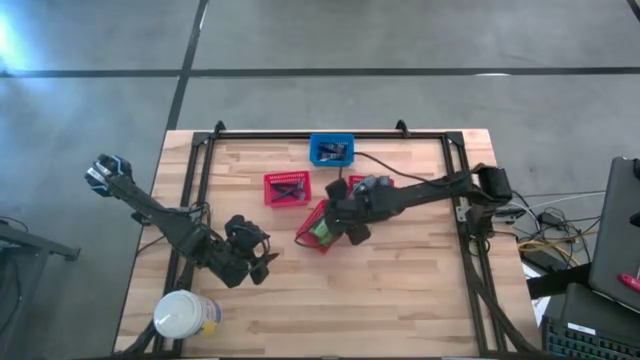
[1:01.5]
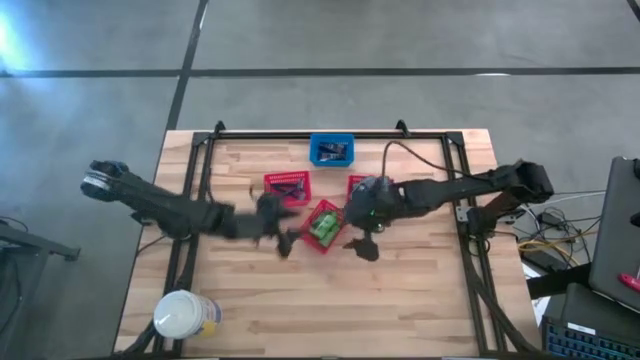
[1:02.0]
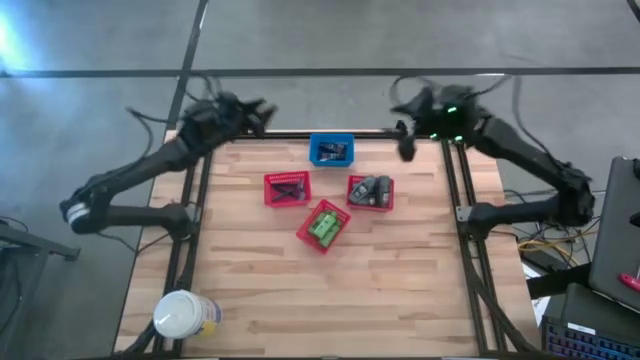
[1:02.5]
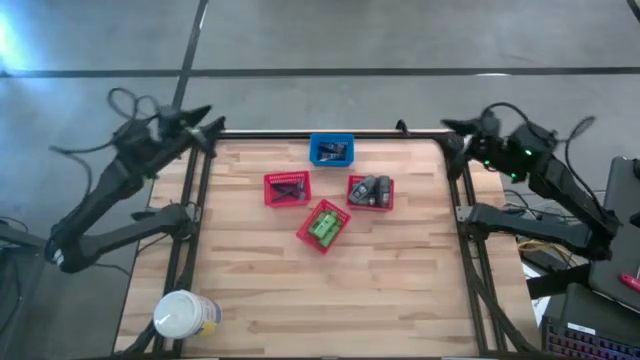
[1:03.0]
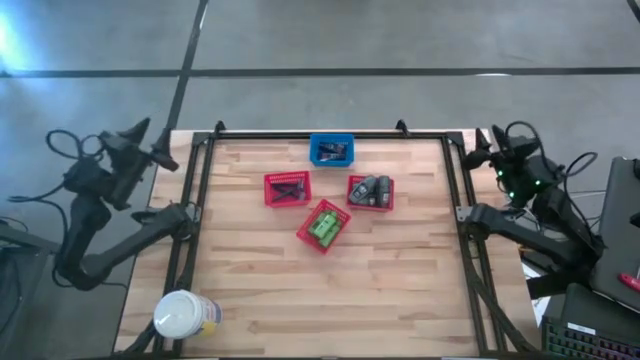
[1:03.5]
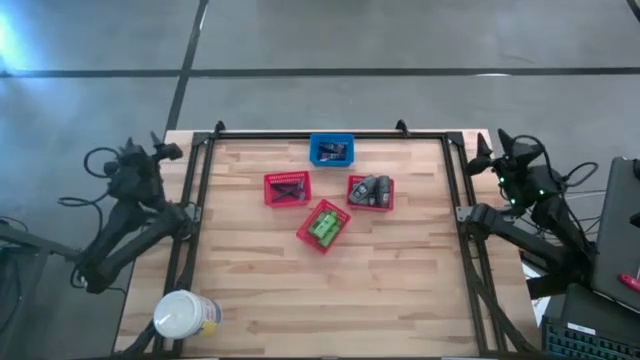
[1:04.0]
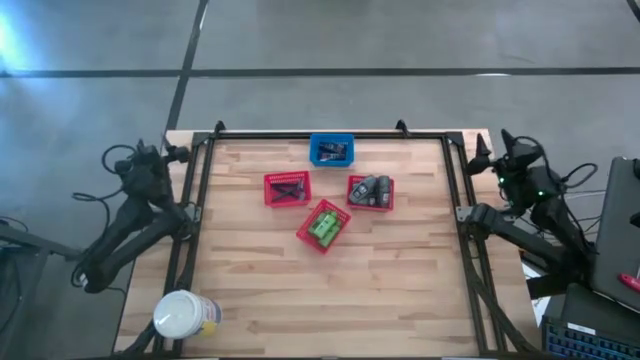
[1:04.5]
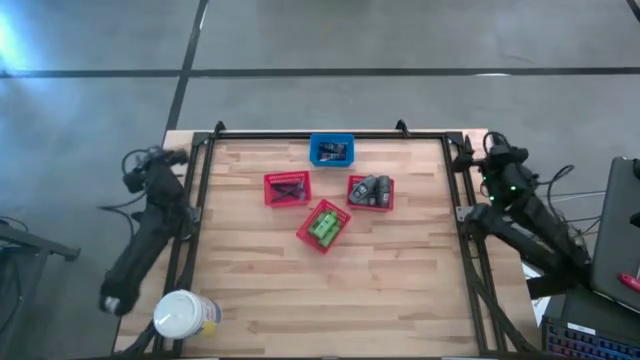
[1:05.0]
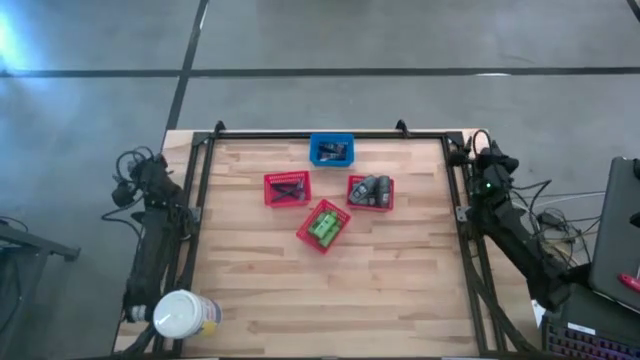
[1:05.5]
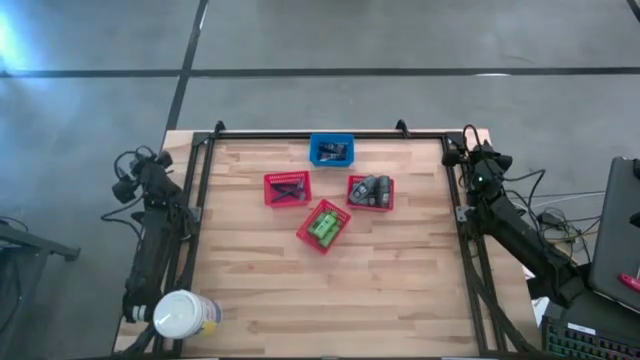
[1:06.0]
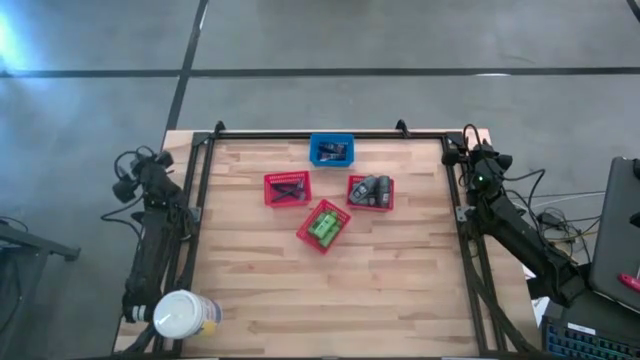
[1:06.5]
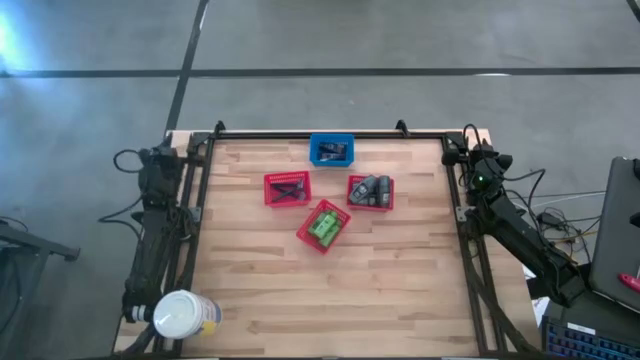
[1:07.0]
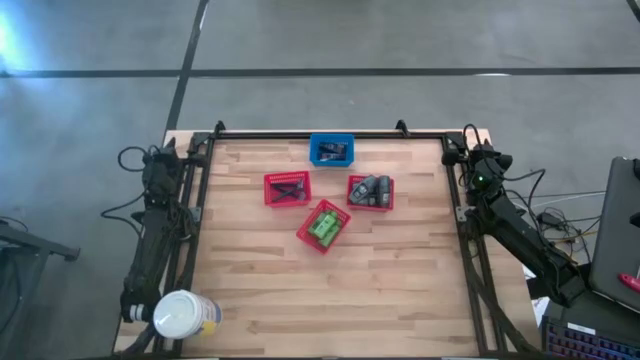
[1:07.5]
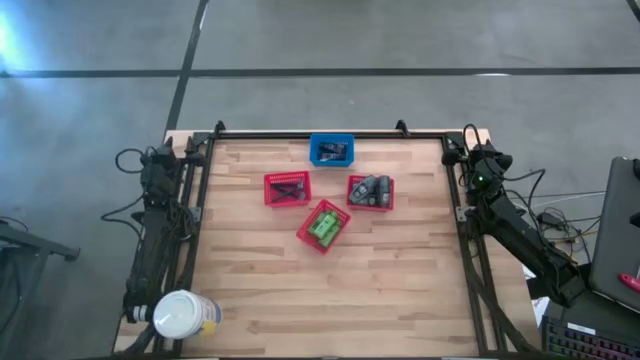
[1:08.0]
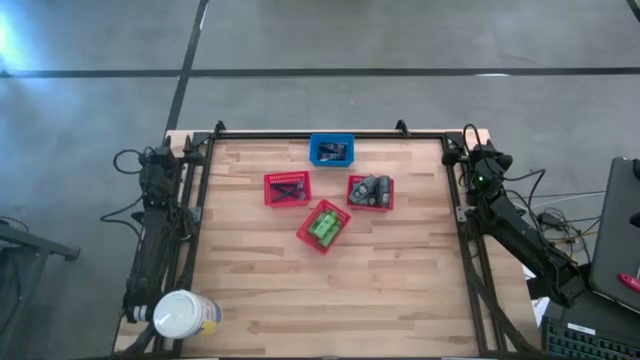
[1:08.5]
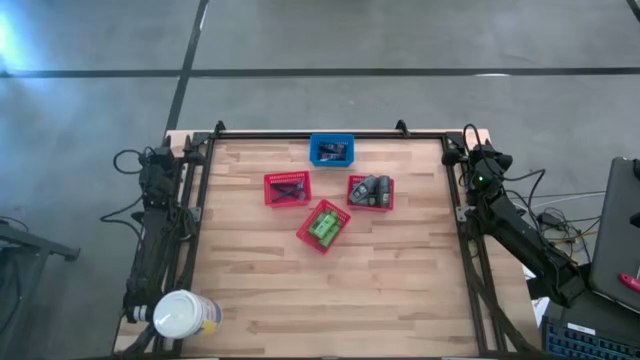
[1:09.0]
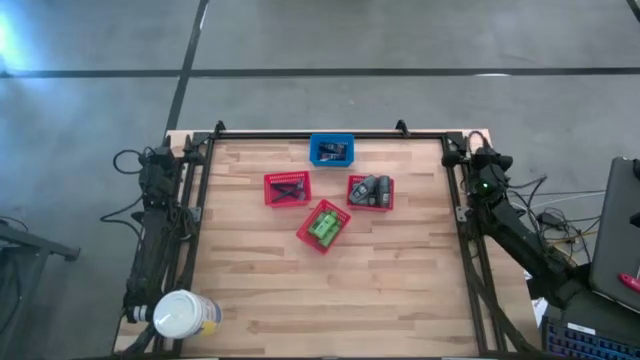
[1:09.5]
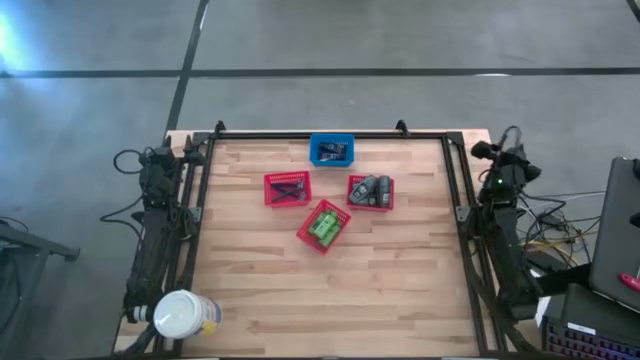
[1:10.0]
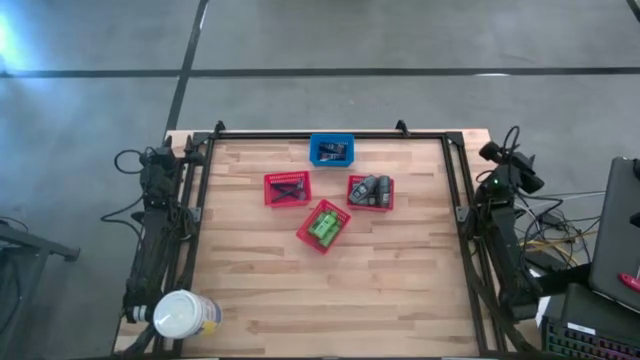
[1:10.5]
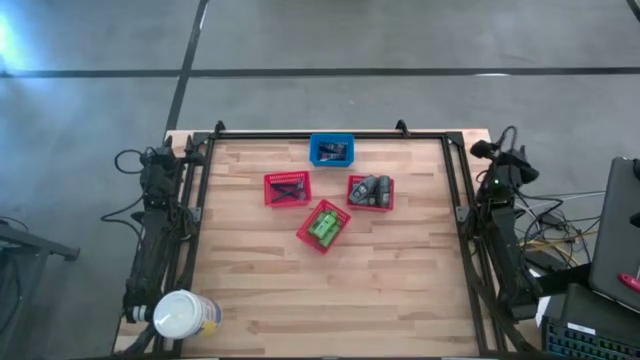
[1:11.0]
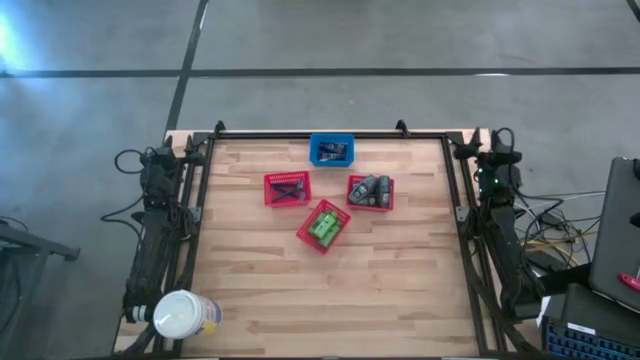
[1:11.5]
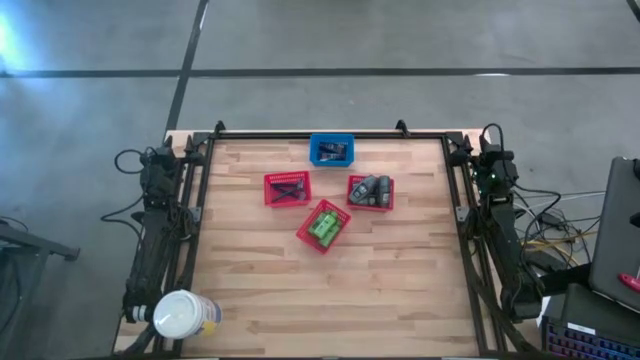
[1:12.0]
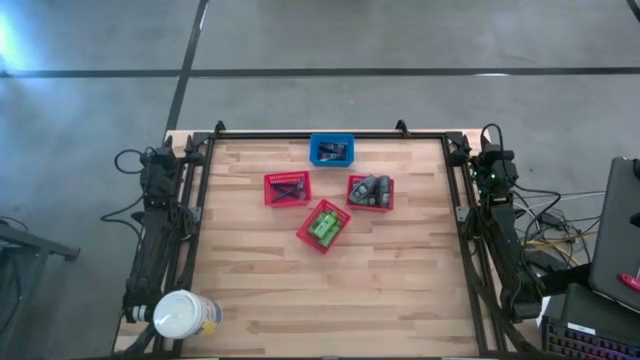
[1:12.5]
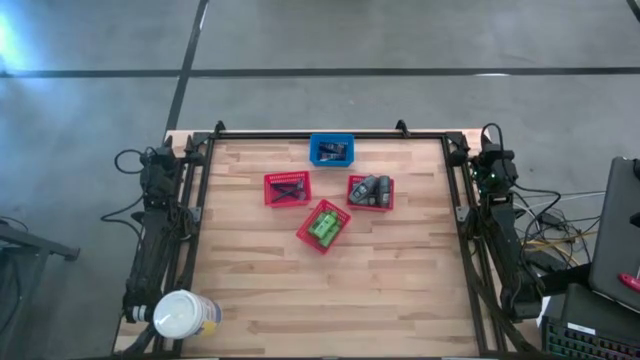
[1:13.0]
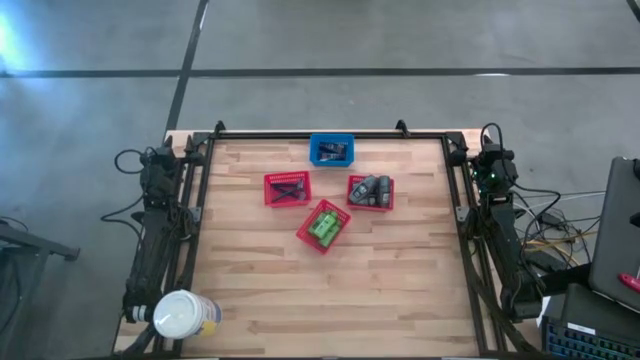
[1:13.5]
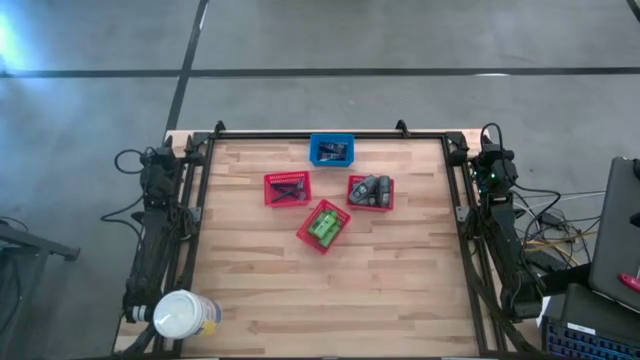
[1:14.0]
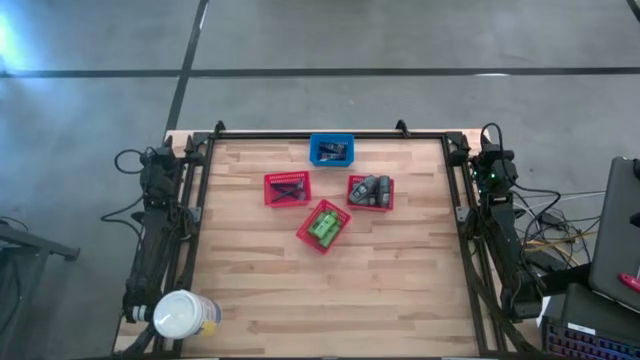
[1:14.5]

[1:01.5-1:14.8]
Task: Pick & Place Travel size toiletries
Return to Home Position

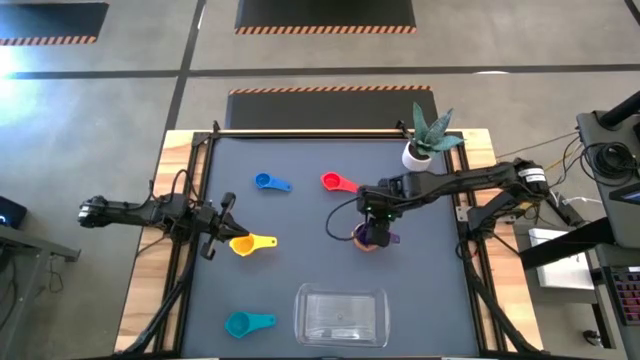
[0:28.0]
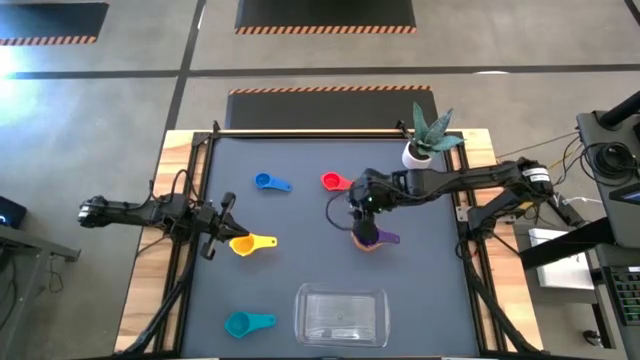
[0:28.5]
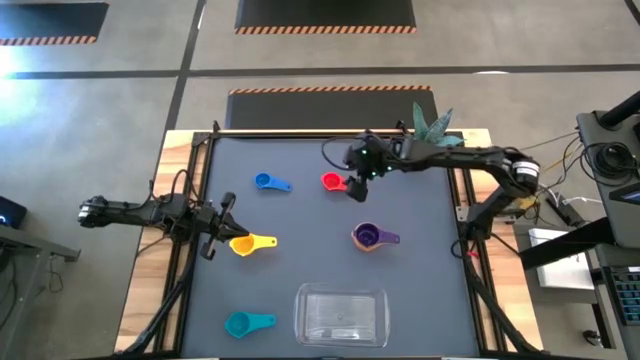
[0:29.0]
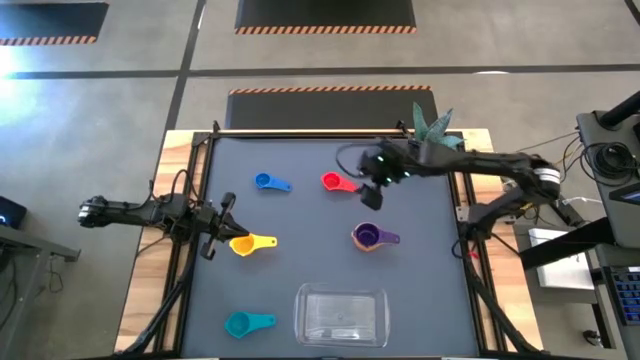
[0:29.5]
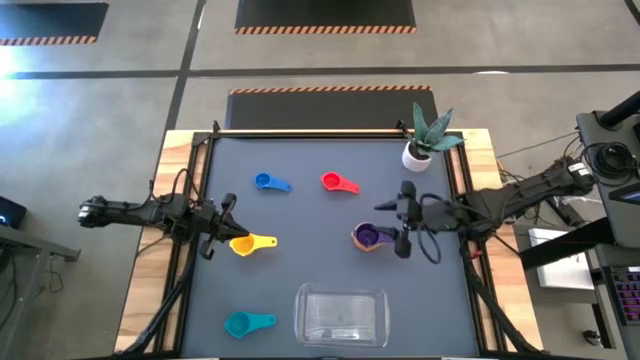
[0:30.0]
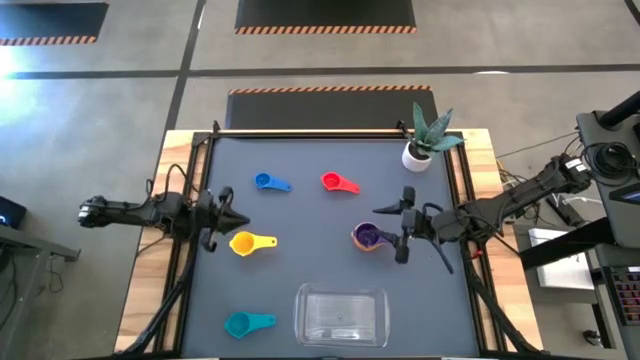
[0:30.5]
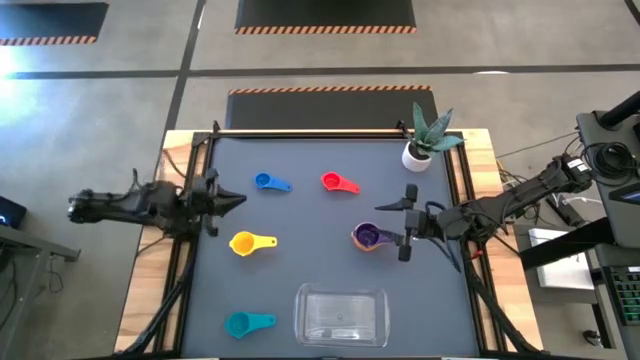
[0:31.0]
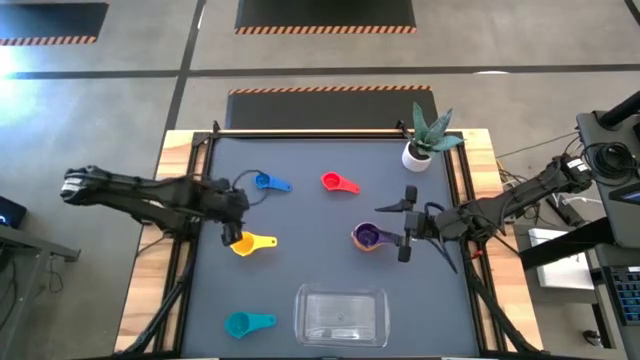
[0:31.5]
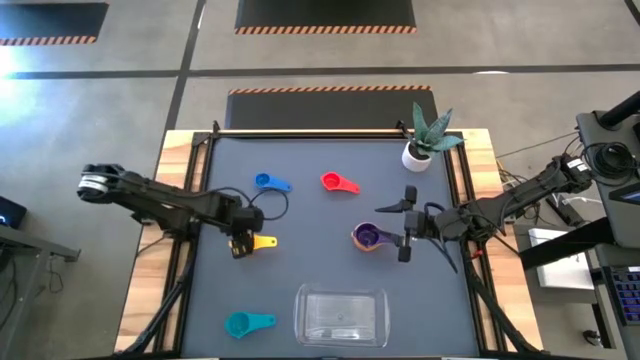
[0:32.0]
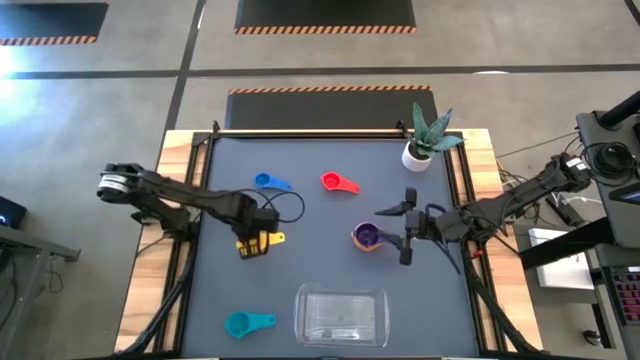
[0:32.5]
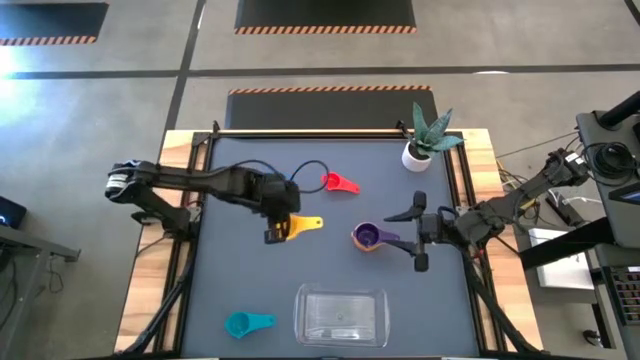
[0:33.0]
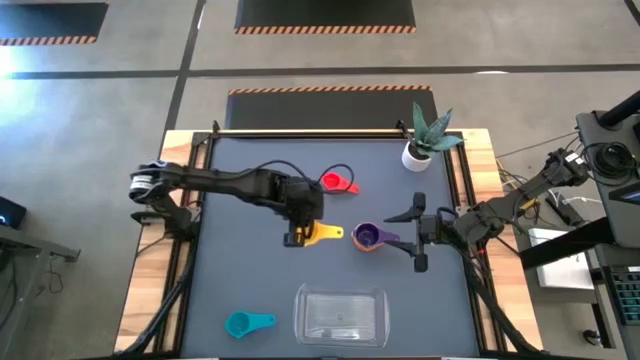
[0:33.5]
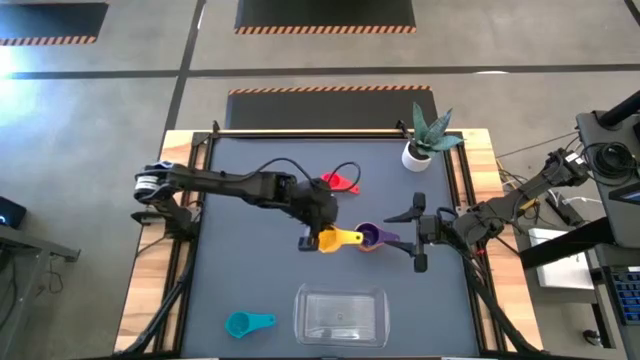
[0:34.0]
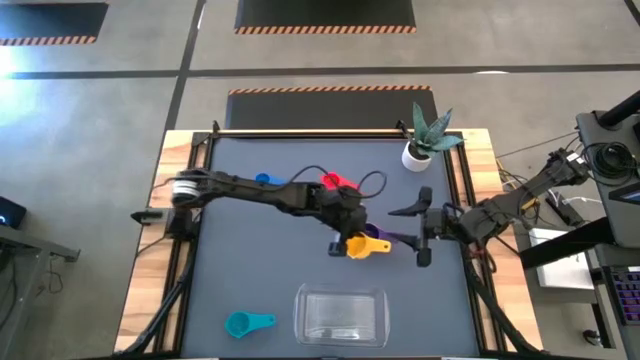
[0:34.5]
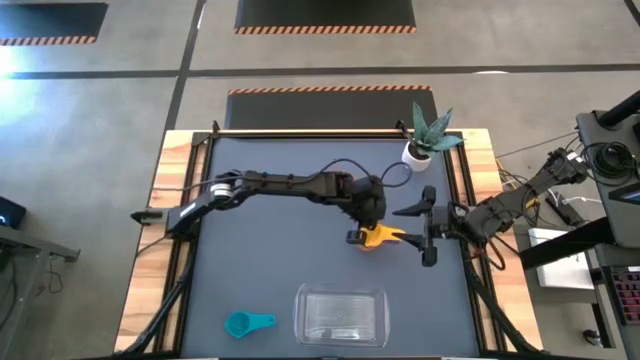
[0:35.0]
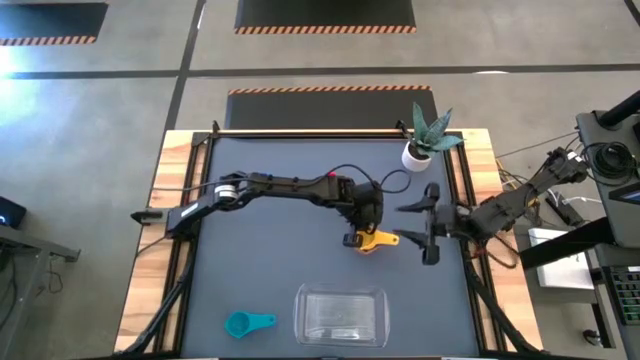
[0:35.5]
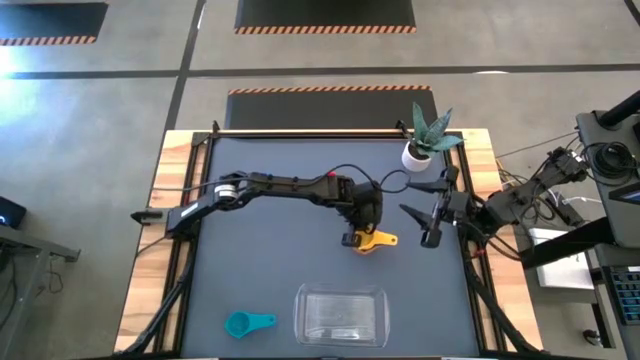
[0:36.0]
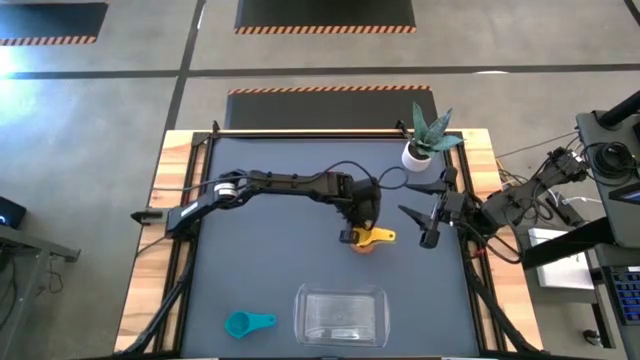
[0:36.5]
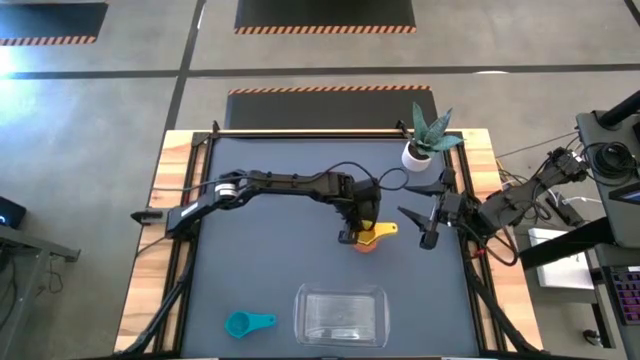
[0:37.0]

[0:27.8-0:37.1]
Task: Nest measuring cups in basket
Stack the yellow measuring cup into the purple measuring cup
